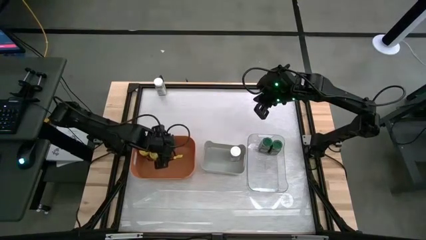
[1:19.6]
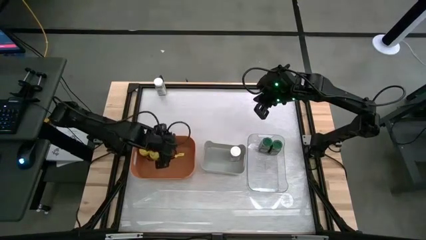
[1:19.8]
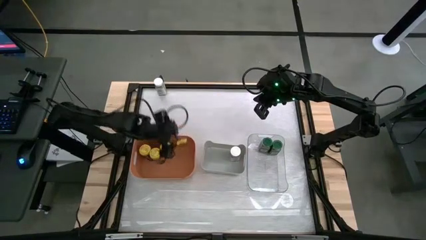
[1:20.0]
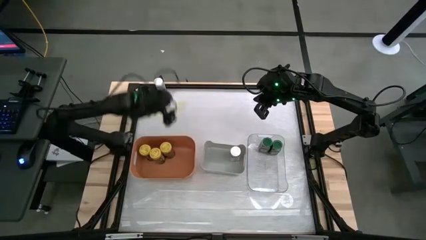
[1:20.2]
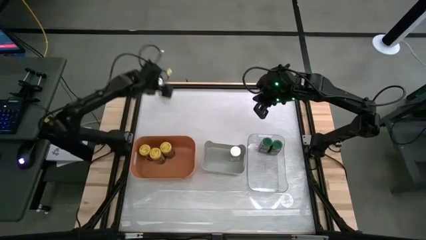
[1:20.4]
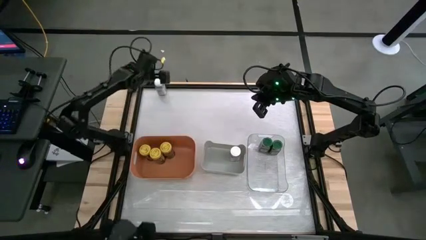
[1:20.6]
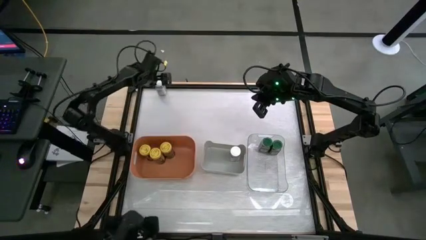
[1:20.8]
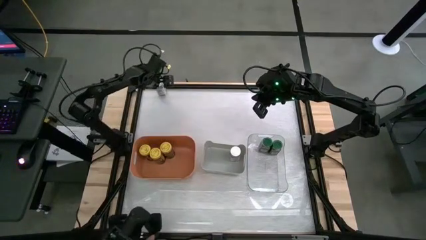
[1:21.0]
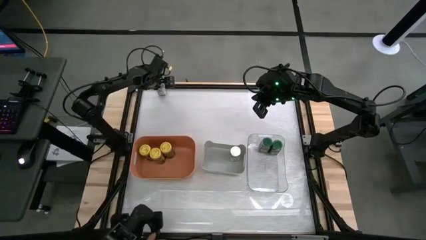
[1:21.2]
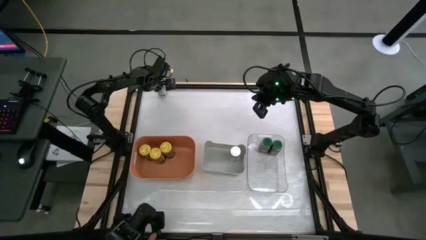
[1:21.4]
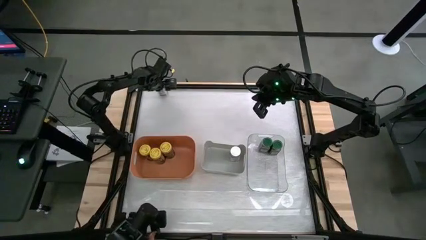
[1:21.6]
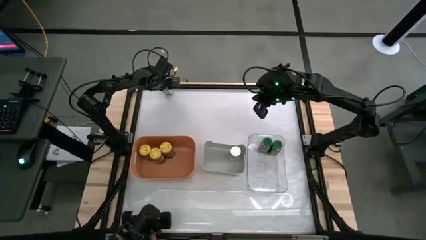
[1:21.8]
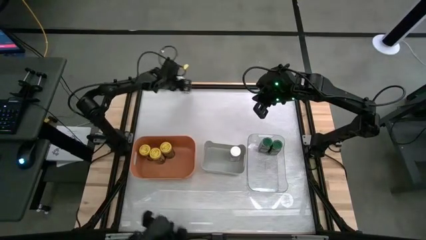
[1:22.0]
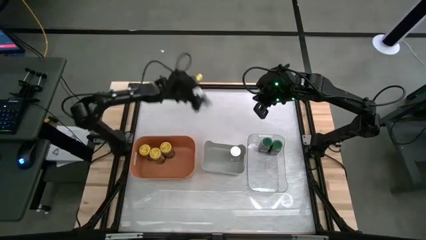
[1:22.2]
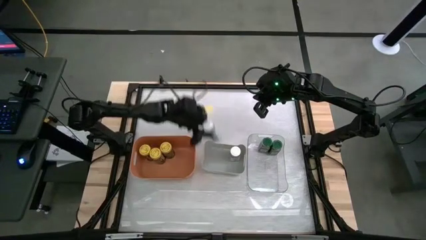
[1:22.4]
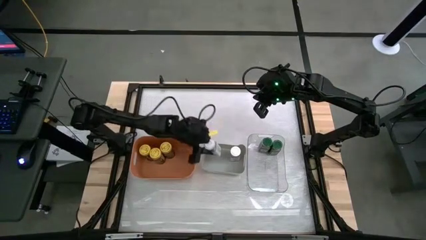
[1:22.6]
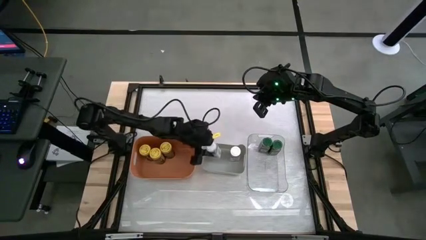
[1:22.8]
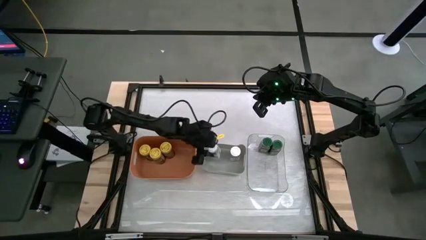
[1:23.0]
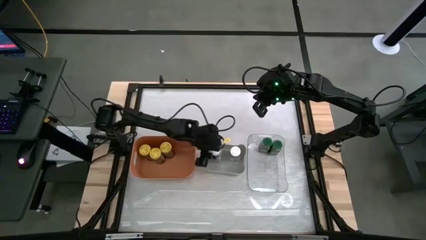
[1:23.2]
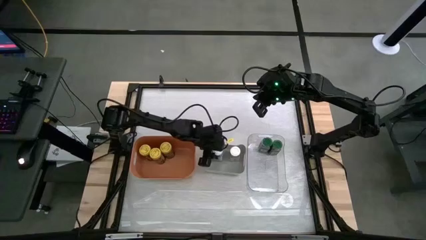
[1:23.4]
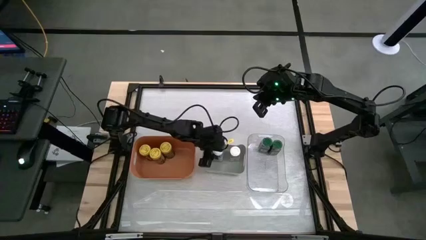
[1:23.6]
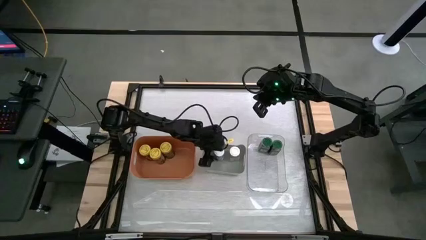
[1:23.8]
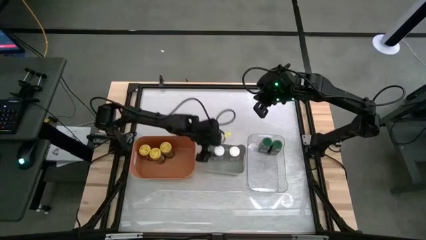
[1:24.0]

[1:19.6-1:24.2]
Task: Sort spices by type
Put the white seasoning bottle into the gray bin

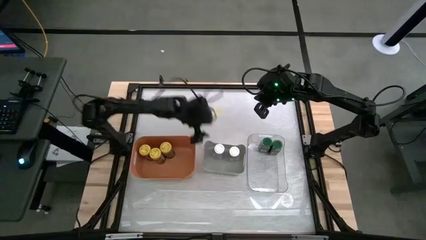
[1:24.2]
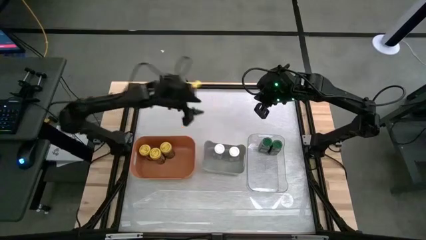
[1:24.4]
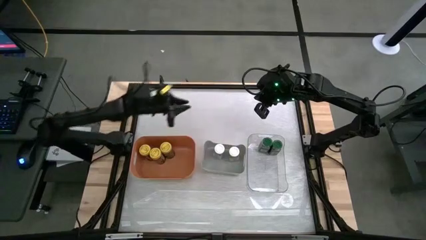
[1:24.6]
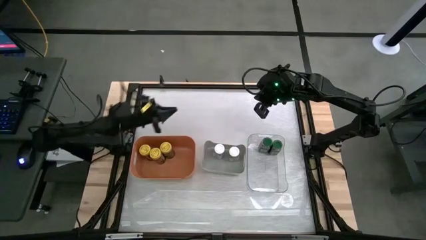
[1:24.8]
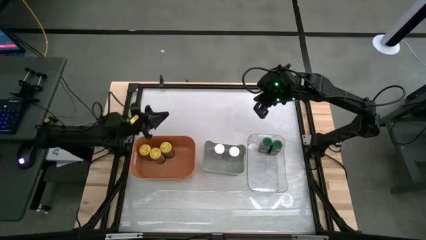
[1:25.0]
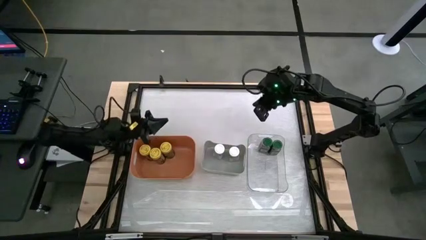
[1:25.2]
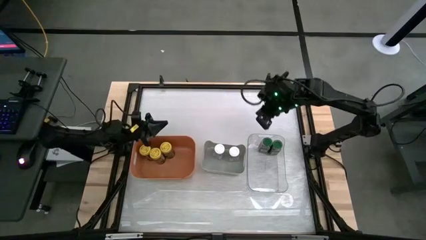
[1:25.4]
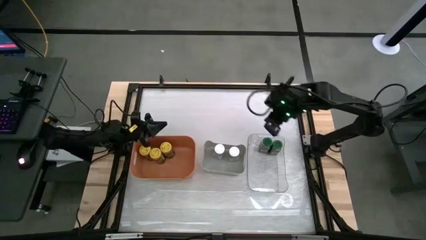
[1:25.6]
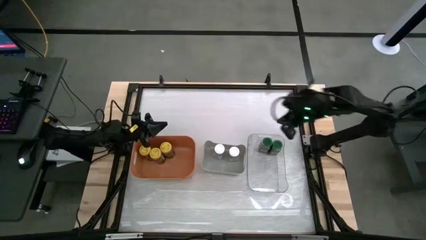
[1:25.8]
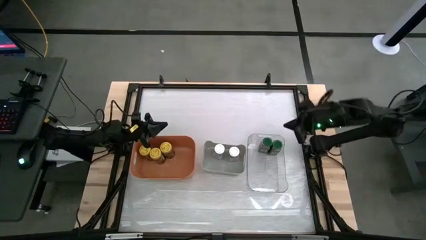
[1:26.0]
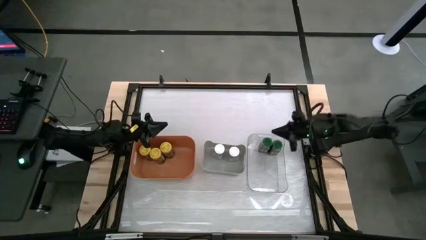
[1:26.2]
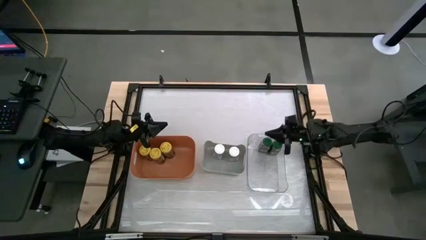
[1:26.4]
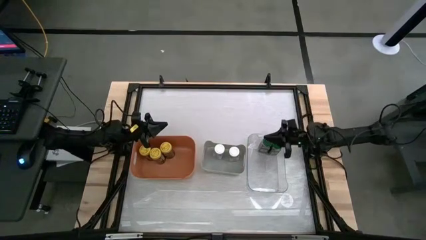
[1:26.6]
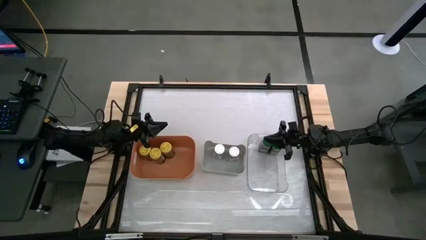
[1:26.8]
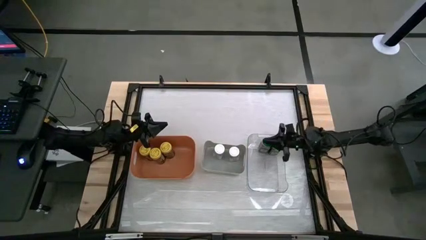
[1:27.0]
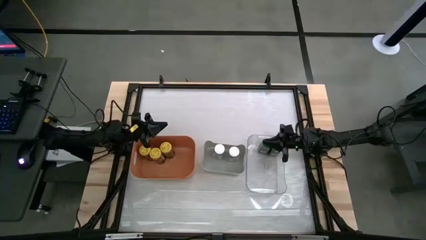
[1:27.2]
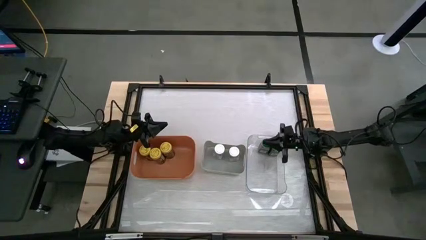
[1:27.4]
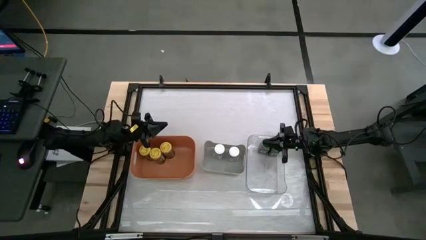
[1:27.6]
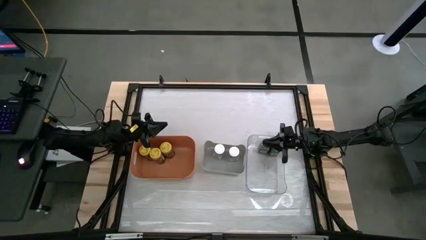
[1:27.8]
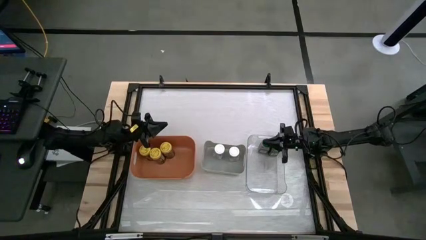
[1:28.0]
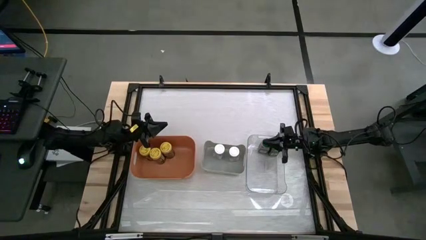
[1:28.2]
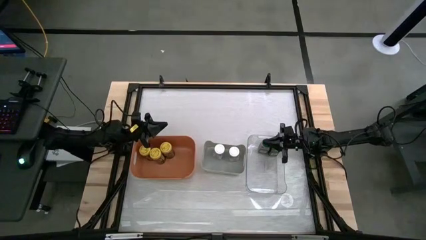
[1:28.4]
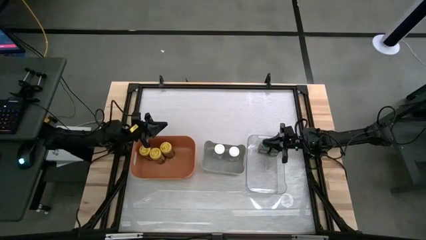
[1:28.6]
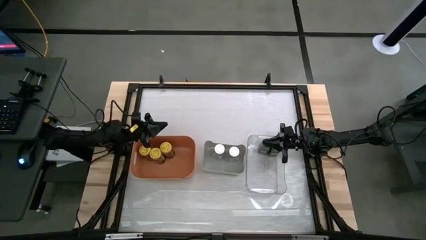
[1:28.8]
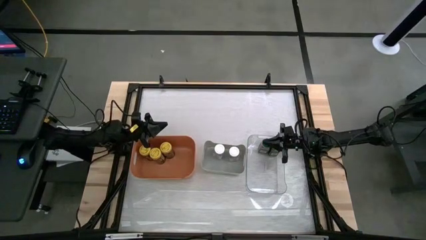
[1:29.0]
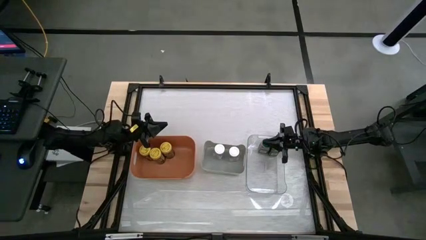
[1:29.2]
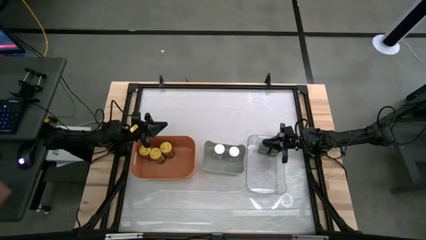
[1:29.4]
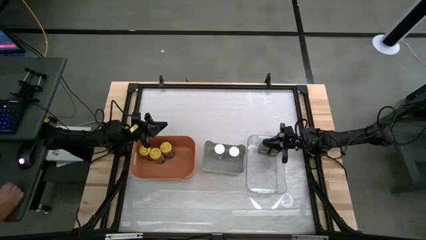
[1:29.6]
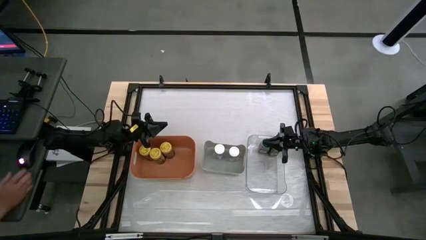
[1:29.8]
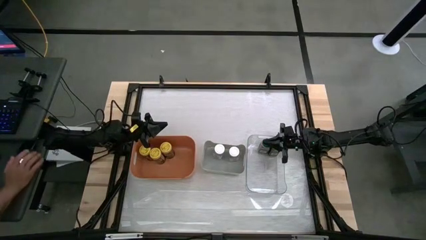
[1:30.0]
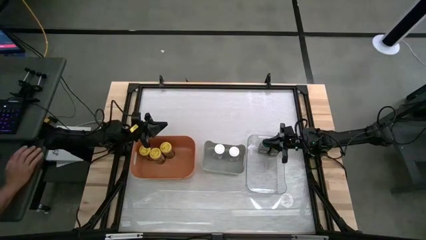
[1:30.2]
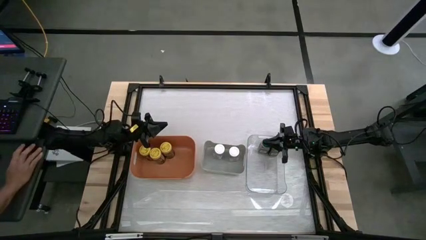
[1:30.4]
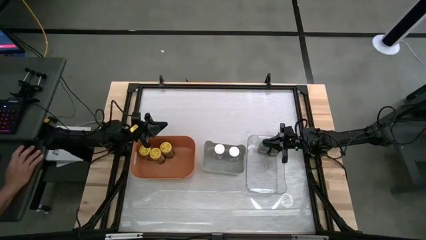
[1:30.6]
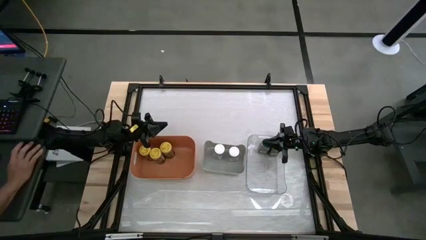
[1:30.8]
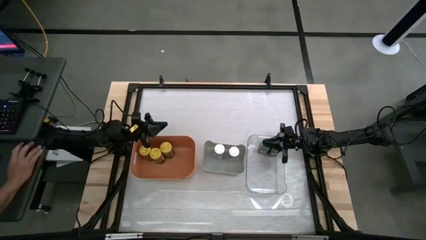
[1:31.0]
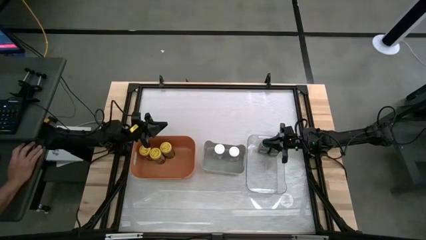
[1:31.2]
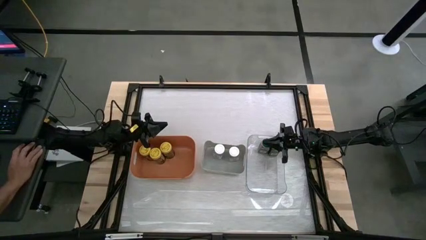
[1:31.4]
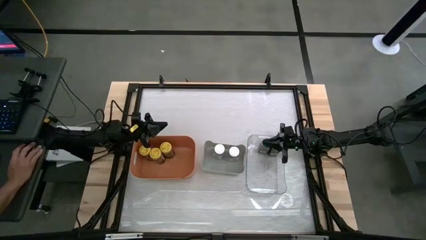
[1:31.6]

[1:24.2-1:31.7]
Return to Home Position

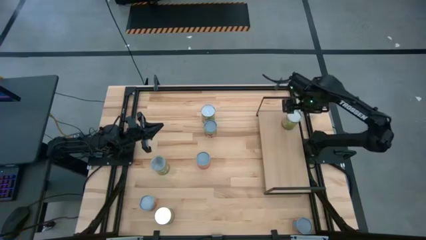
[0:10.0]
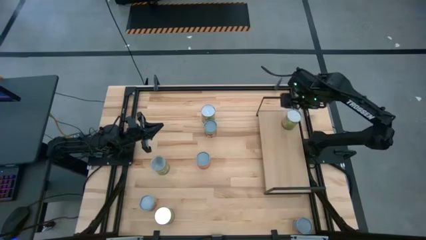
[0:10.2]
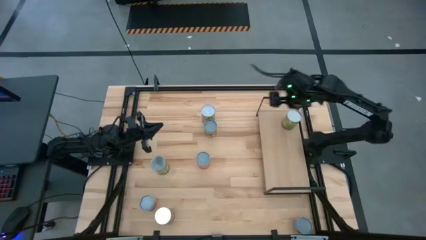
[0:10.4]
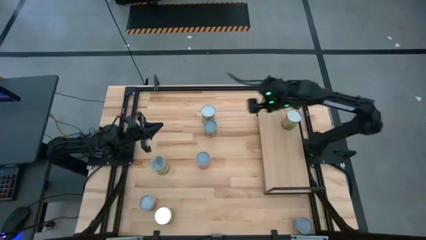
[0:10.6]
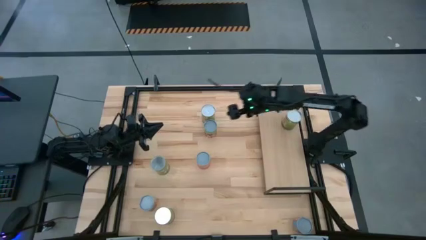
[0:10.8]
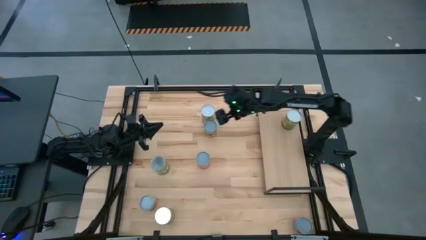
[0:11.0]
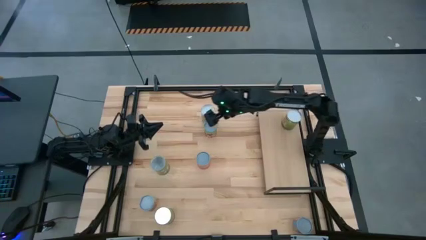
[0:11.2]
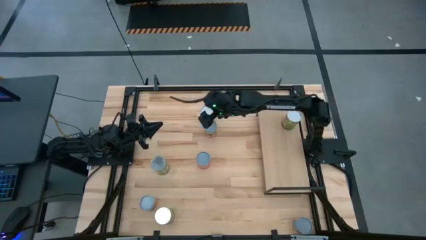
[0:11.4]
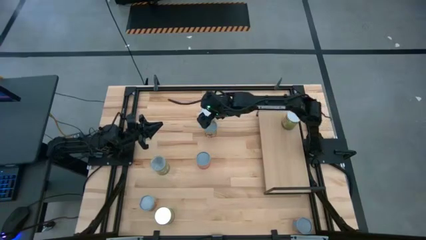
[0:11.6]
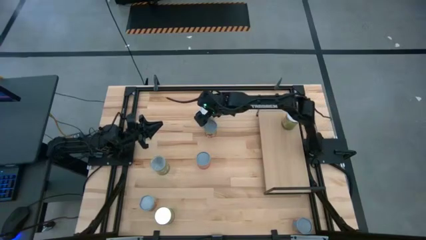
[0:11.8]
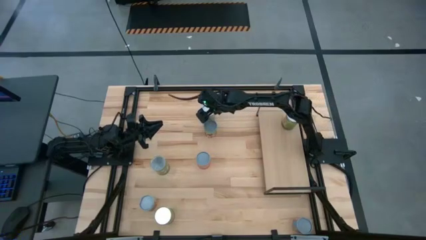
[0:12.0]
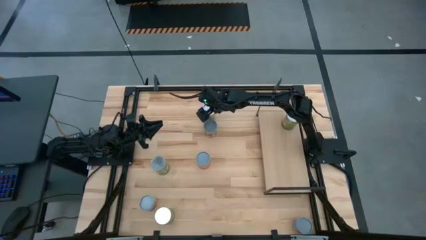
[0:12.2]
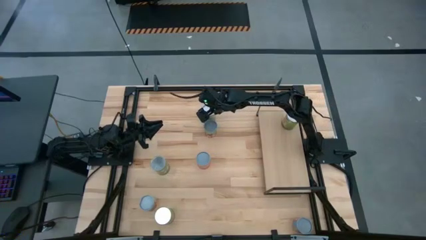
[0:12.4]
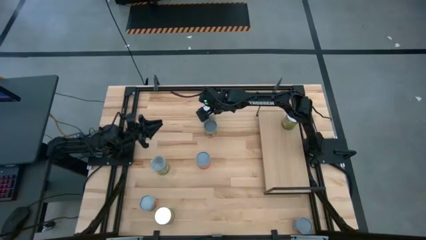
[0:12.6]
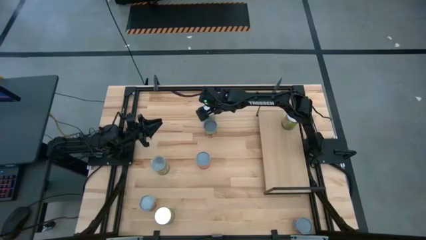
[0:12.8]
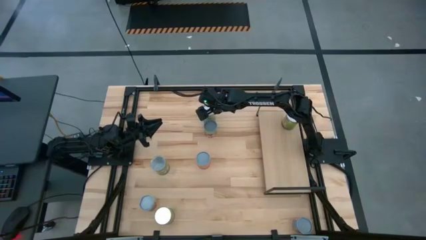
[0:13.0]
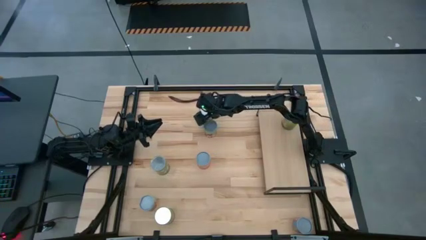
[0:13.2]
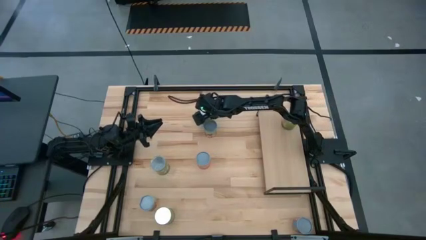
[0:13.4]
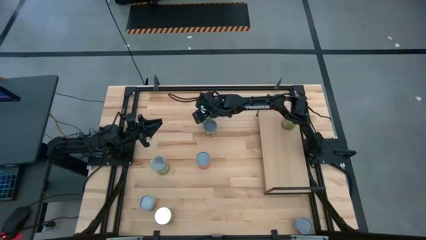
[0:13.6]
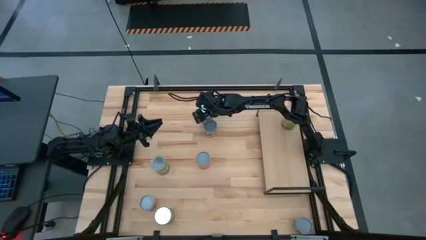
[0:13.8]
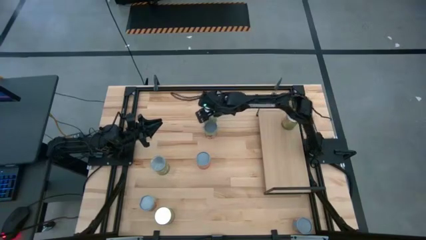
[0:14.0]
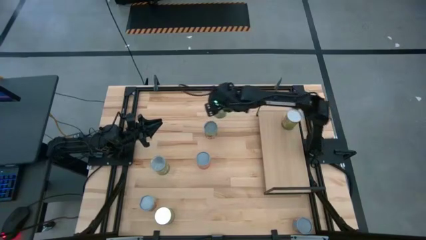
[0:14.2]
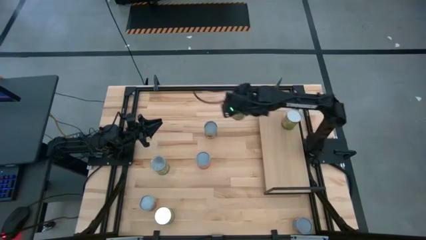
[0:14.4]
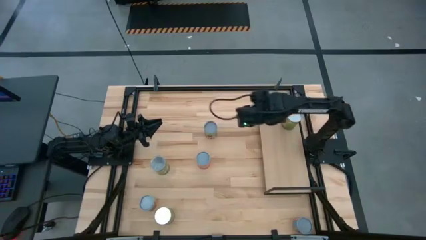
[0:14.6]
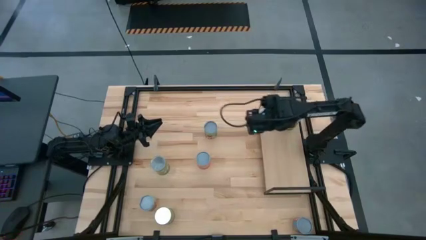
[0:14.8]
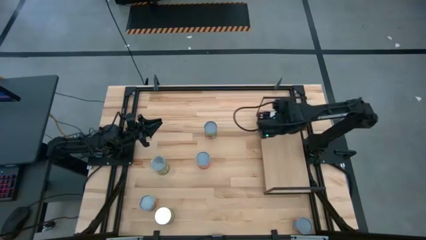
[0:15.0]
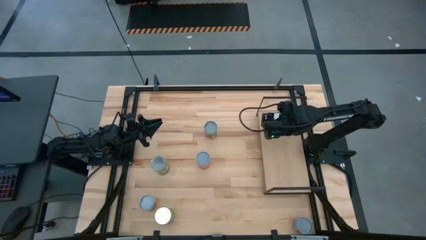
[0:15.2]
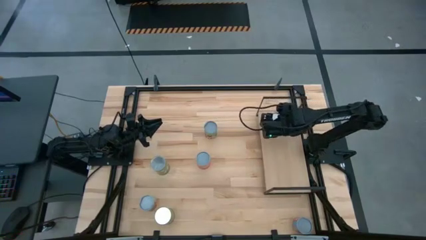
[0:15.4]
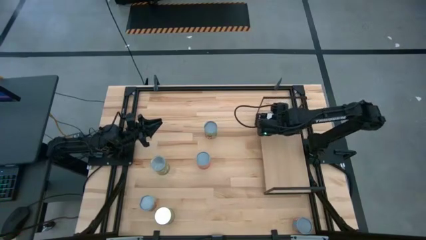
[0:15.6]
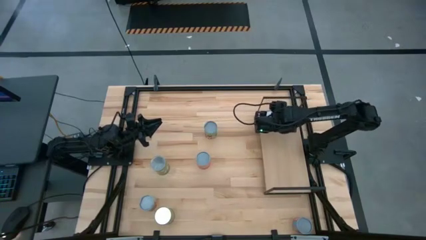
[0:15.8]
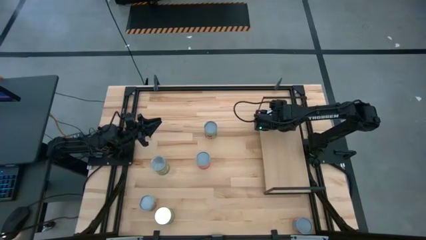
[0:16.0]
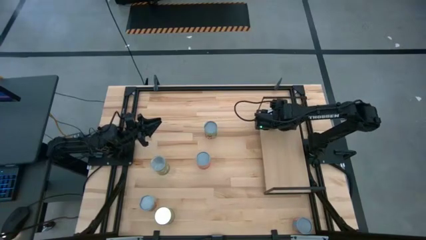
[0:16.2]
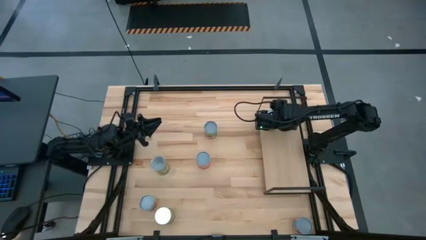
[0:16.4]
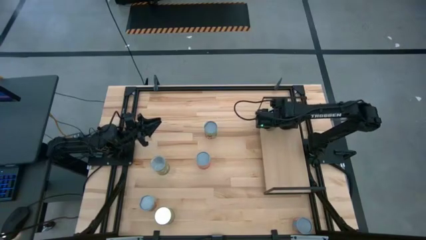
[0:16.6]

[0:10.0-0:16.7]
Task: Pick and place cans onto a shelf
Put the large canned oranges on the shelf aligned with the other large canned oranges
